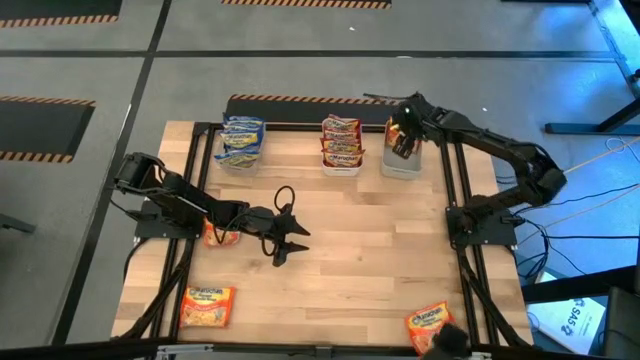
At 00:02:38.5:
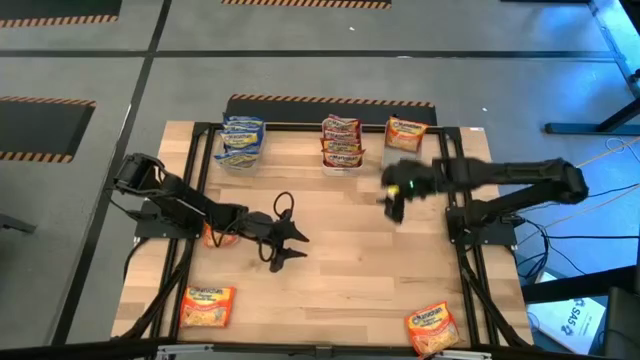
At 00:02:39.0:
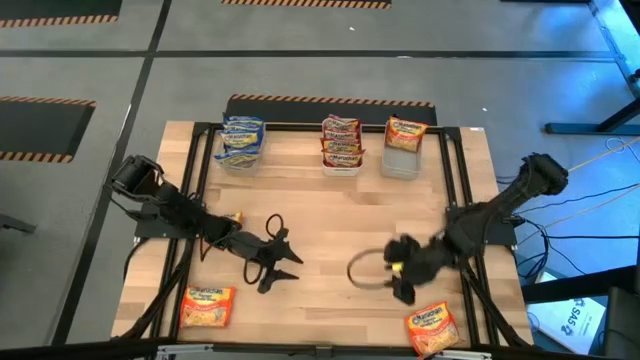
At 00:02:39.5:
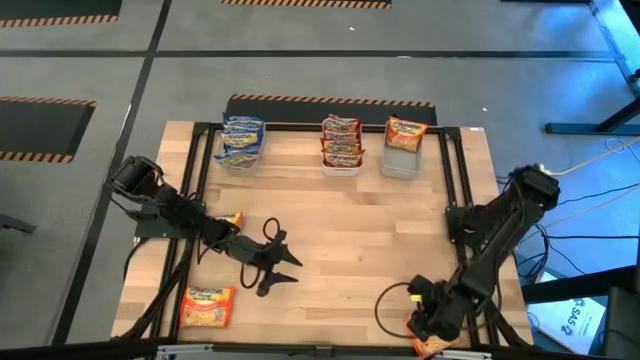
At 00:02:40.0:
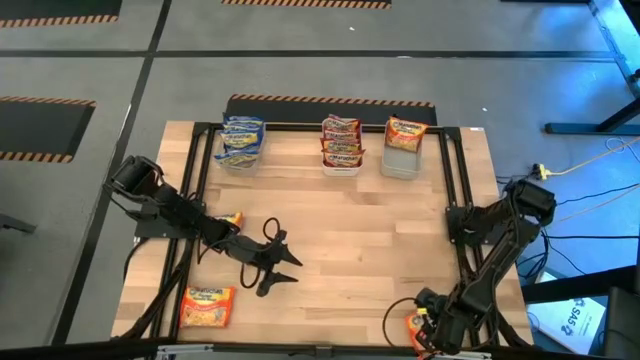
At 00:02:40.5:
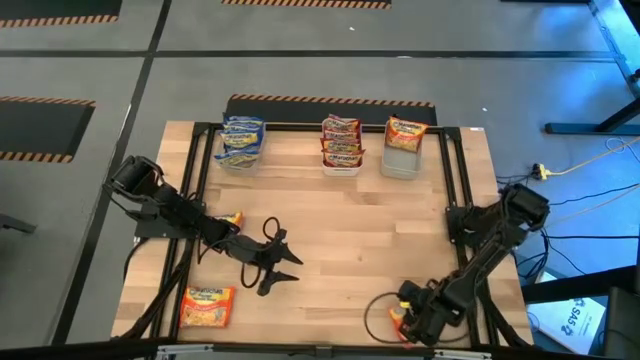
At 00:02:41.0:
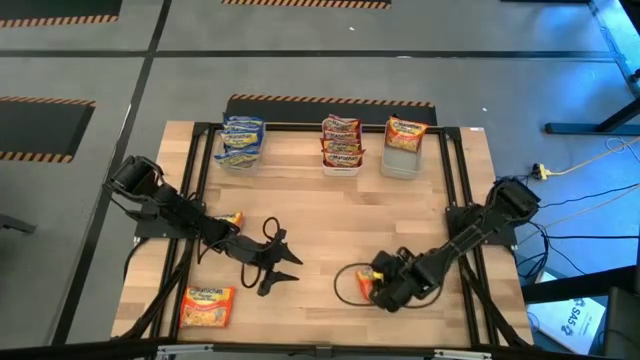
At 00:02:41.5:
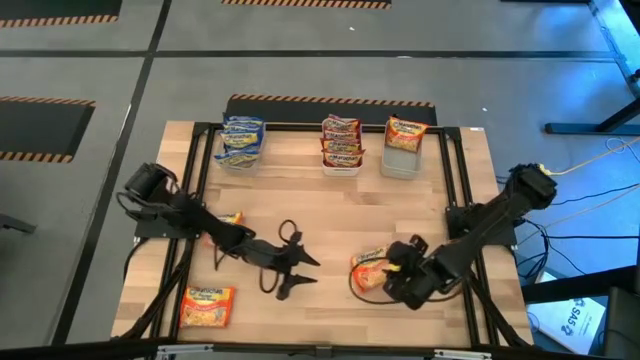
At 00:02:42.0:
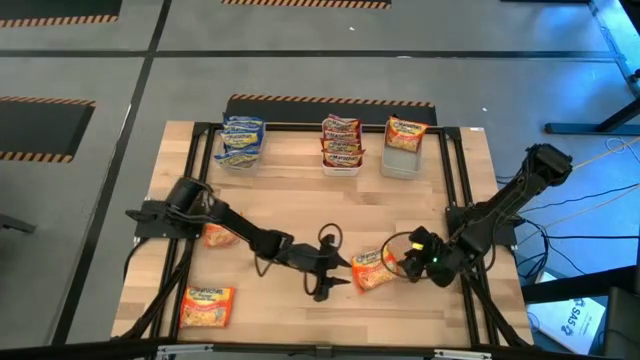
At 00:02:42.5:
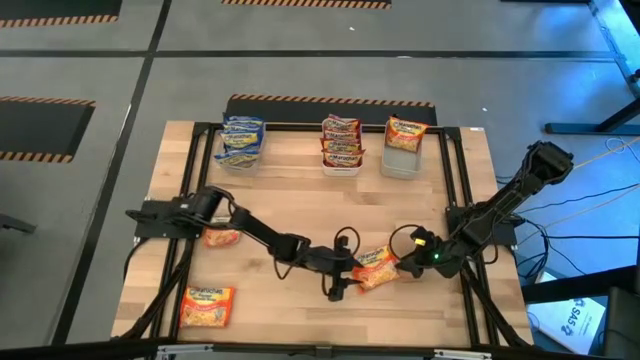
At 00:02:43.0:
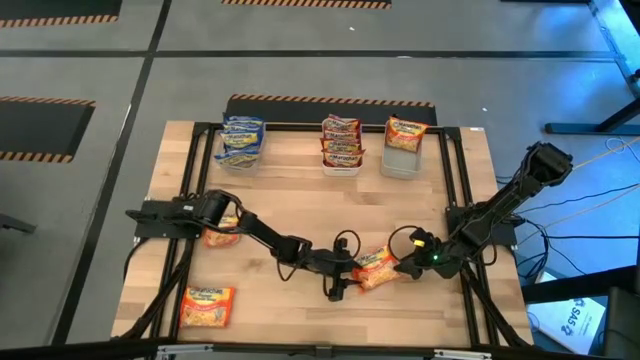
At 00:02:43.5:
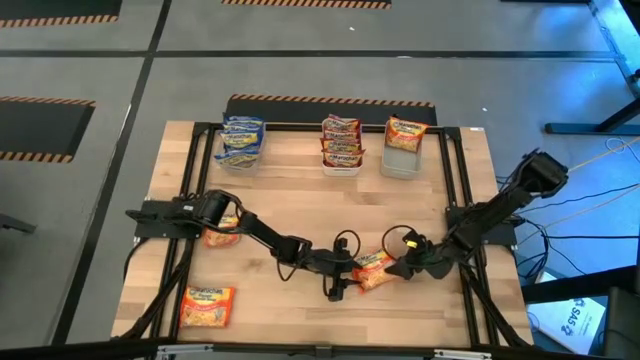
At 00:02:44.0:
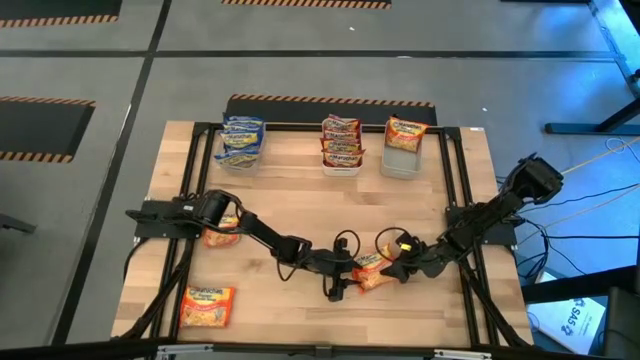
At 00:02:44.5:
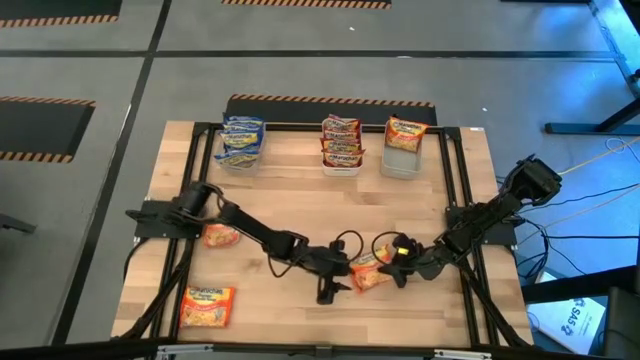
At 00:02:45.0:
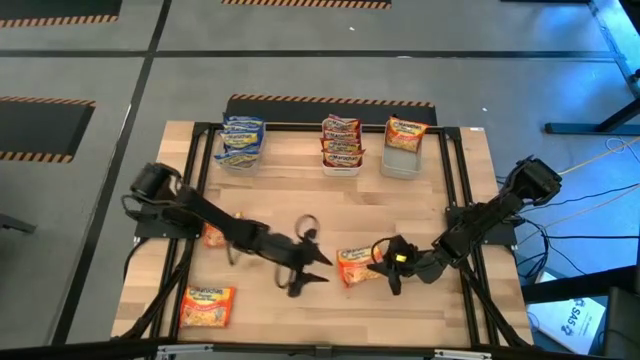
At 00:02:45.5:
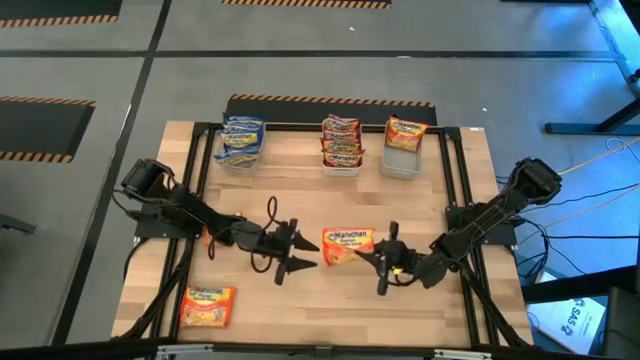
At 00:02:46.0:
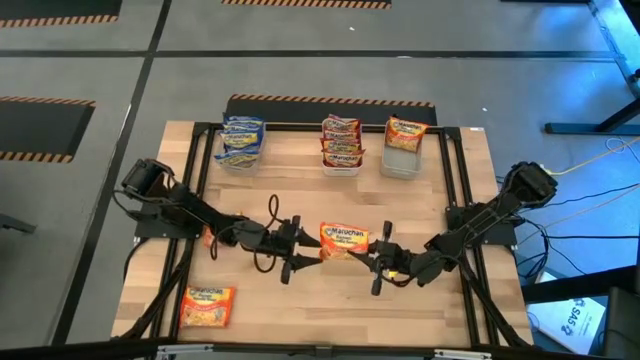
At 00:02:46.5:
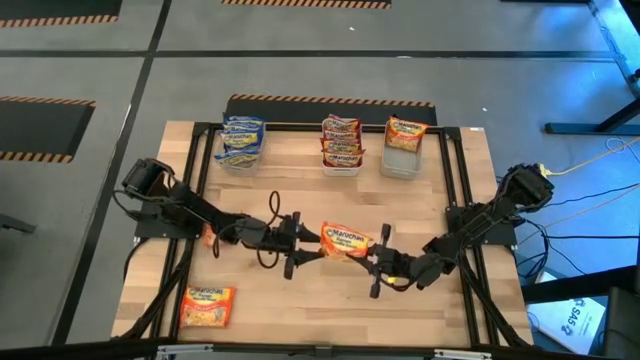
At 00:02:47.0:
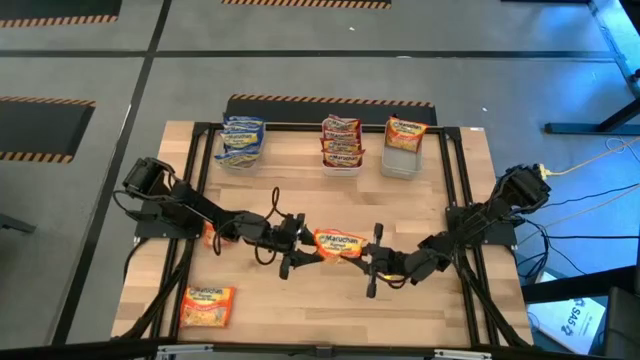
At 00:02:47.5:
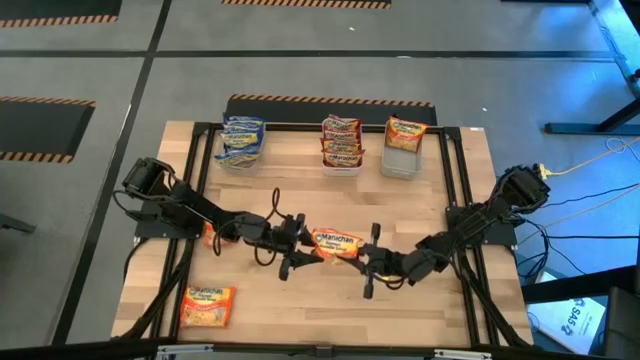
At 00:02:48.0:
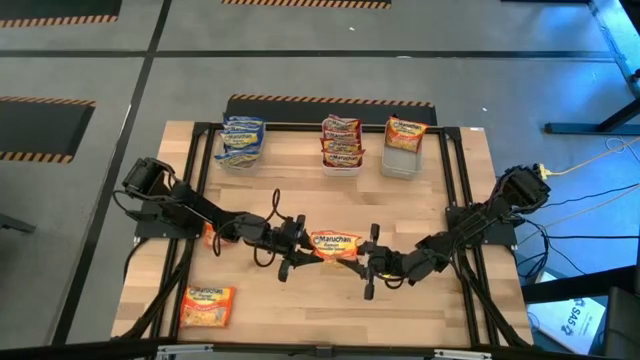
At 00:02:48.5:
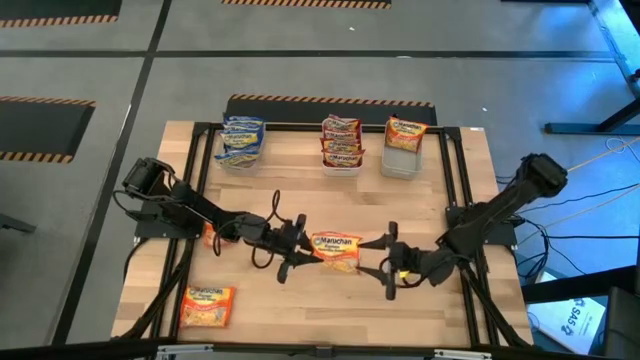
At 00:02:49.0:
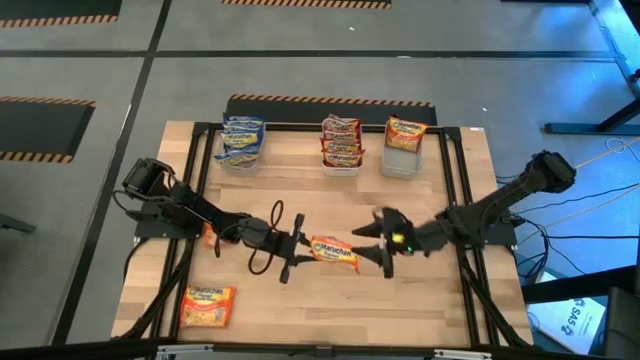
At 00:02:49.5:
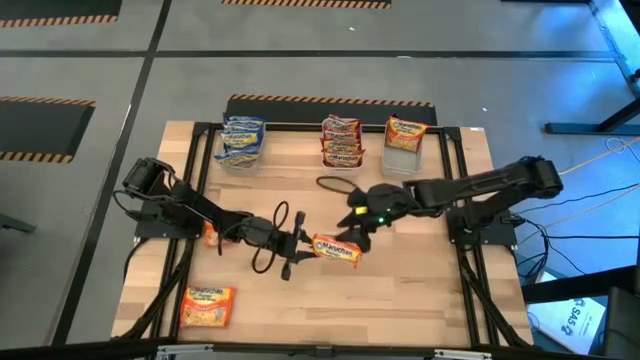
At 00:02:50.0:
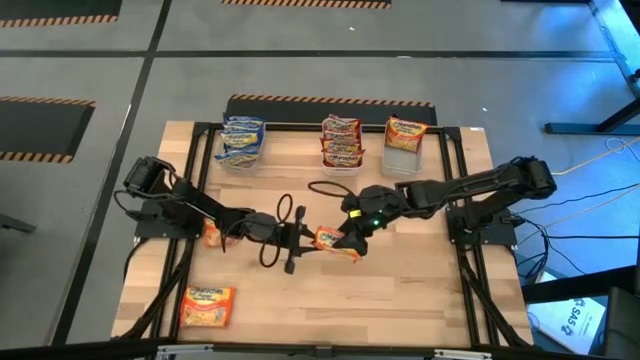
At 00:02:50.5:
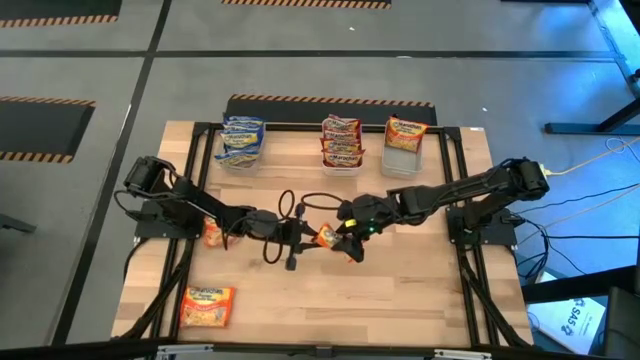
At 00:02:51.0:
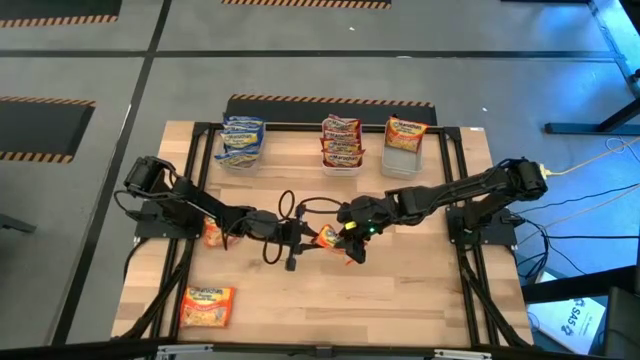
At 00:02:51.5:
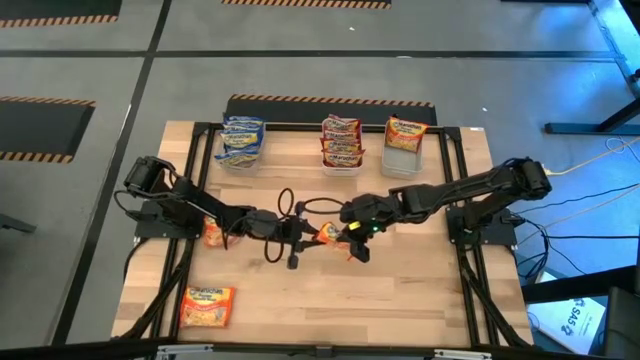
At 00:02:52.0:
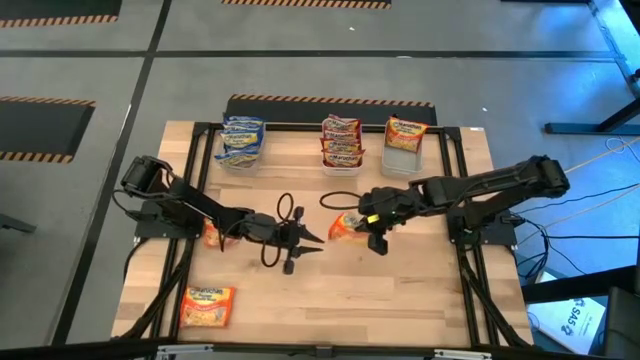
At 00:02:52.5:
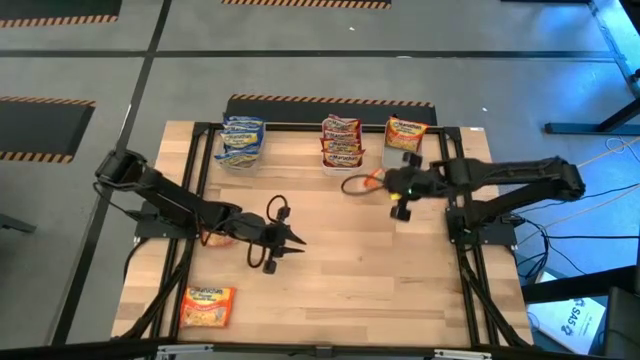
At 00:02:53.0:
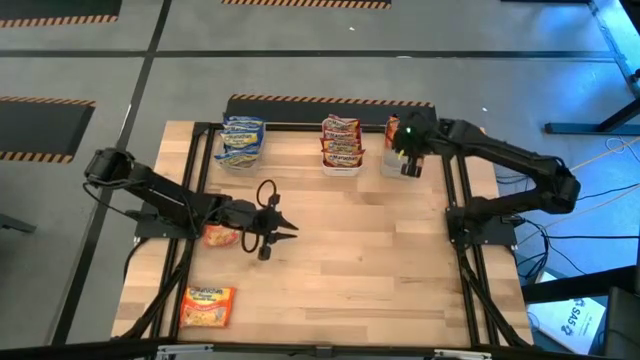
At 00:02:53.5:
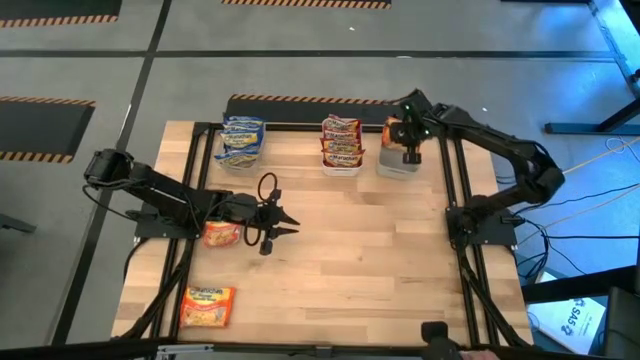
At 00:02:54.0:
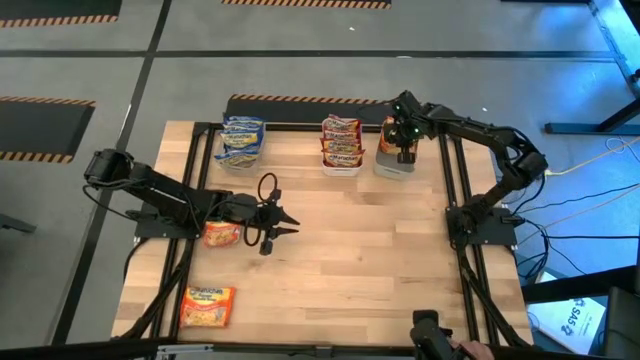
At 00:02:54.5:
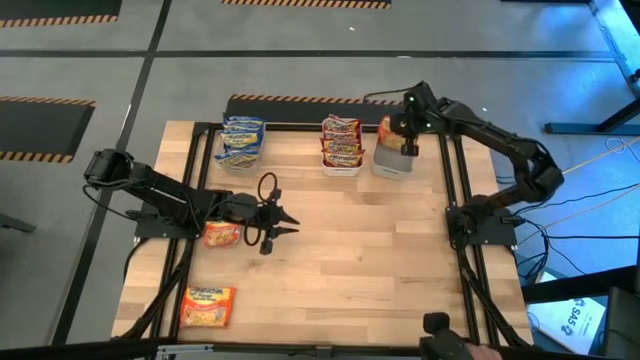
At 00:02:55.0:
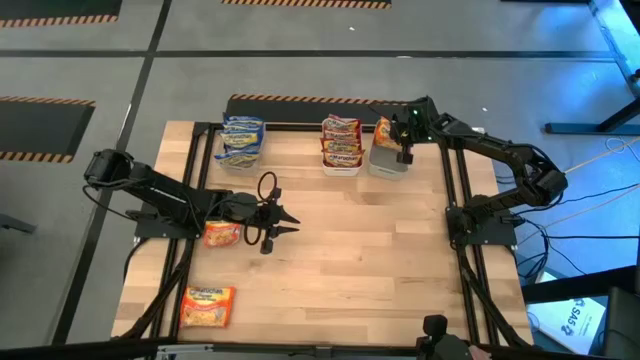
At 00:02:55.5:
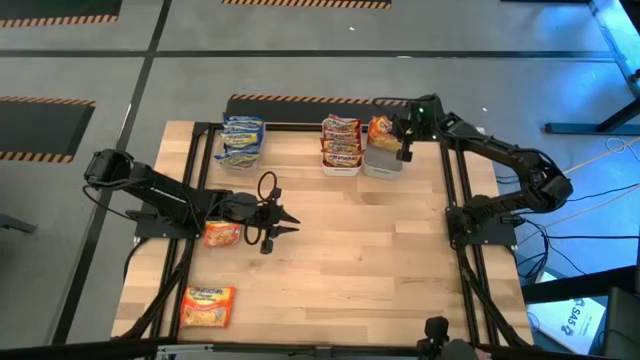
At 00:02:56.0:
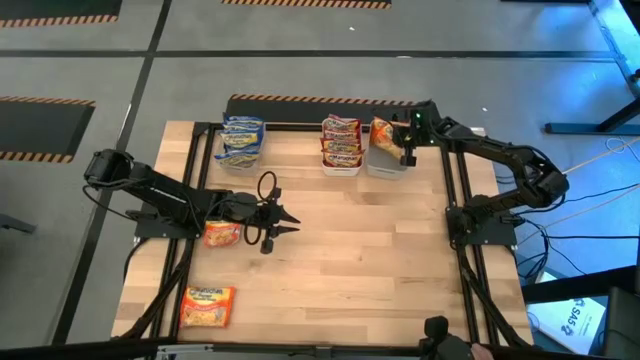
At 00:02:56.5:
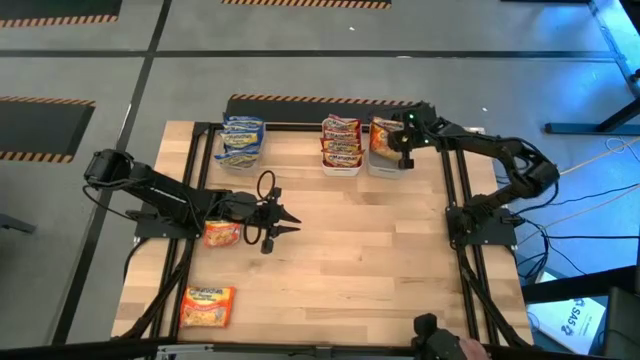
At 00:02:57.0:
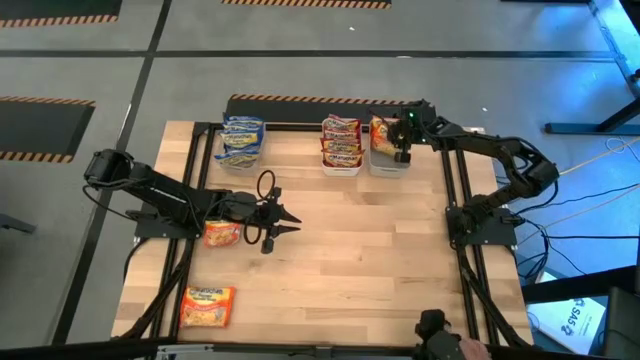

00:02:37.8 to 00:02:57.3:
Task: Sort Maruchan noodles
Put the orange noodle pack into the gray bin

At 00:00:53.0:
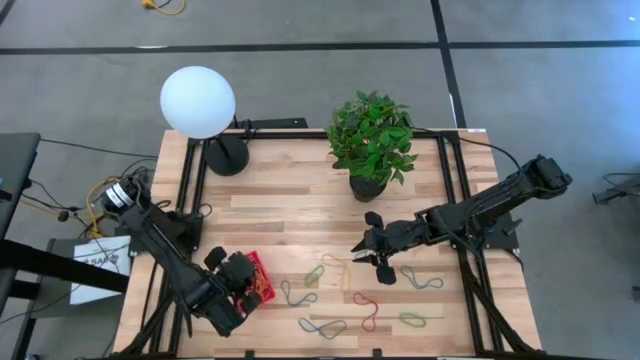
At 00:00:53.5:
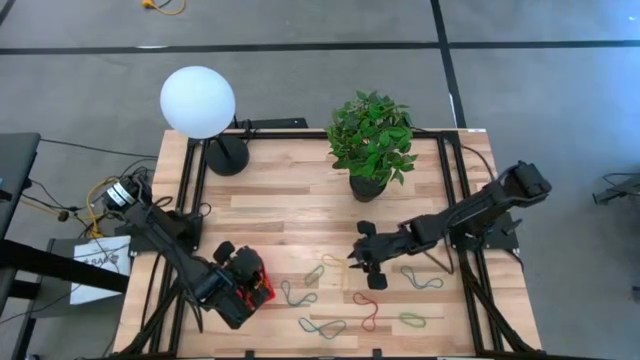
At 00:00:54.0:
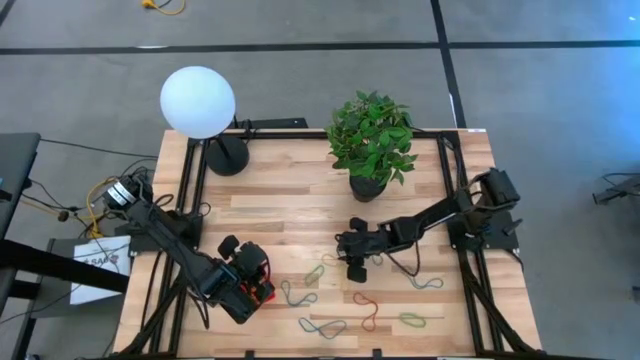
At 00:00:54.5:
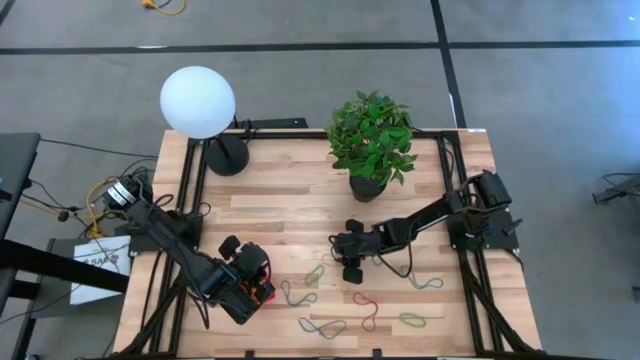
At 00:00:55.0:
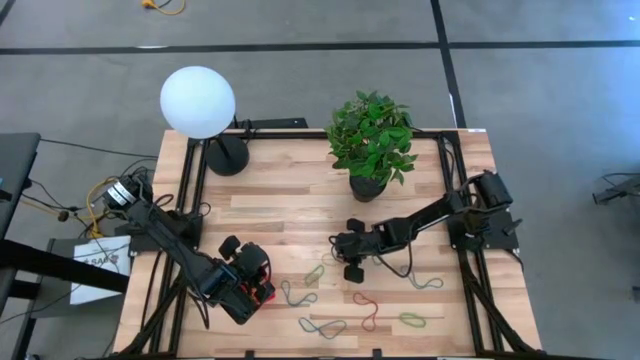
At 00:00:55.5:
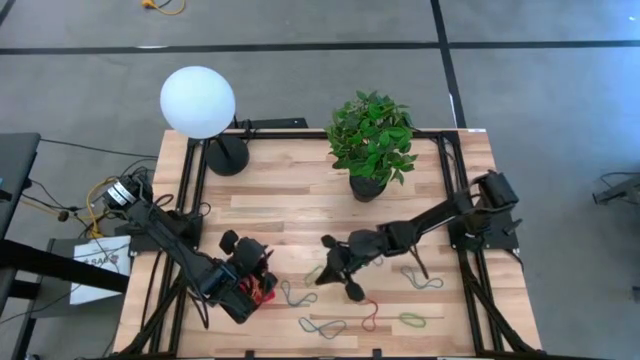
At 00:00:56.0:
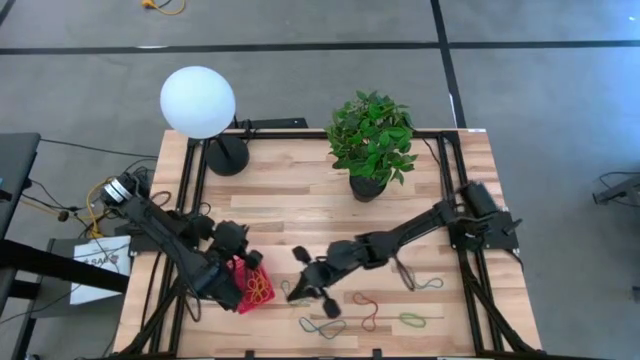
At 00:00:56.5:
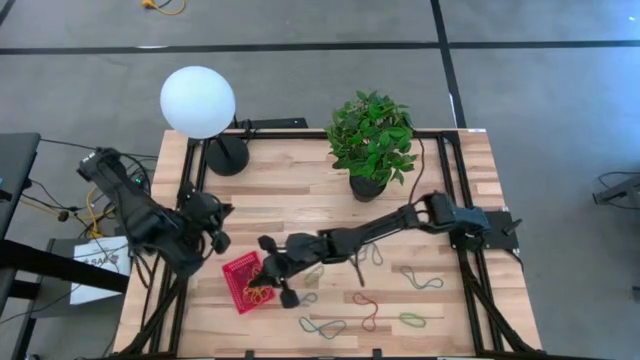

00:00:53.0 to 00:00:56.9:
Task: Pick and place items into bin
Put the yellow rubber band into the red bin
